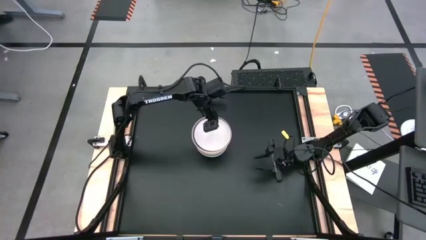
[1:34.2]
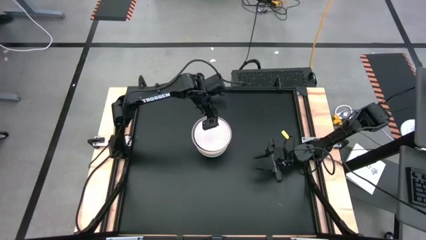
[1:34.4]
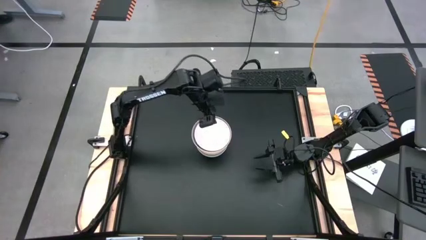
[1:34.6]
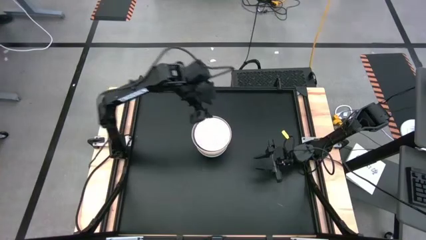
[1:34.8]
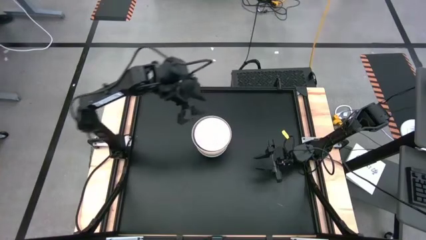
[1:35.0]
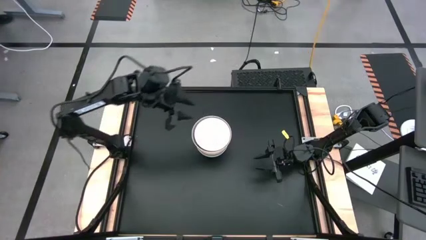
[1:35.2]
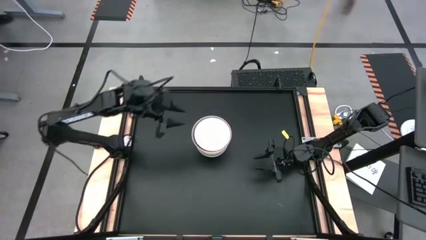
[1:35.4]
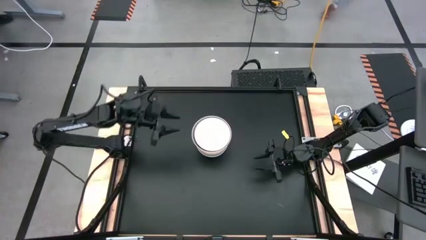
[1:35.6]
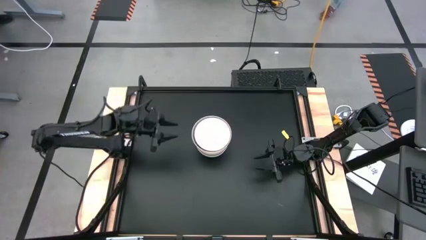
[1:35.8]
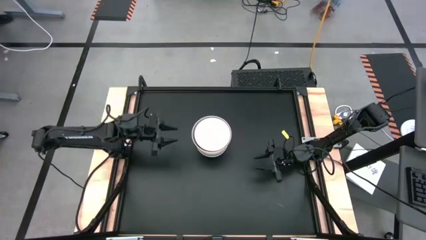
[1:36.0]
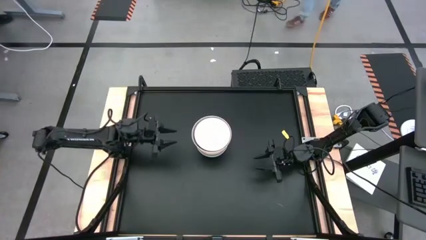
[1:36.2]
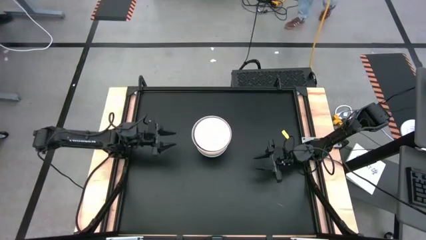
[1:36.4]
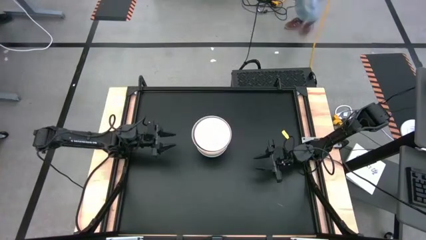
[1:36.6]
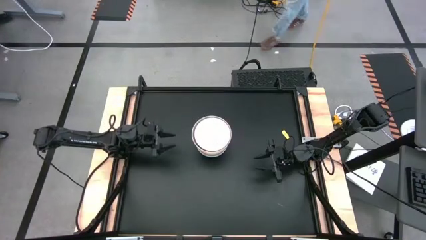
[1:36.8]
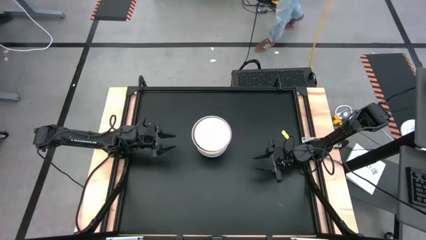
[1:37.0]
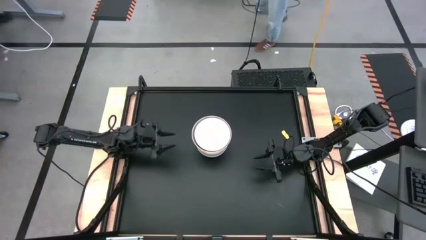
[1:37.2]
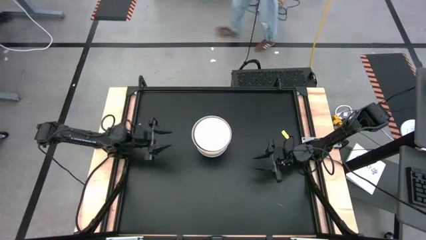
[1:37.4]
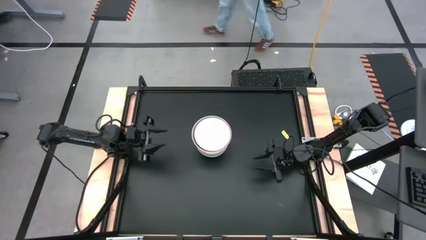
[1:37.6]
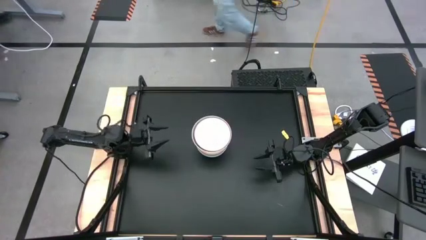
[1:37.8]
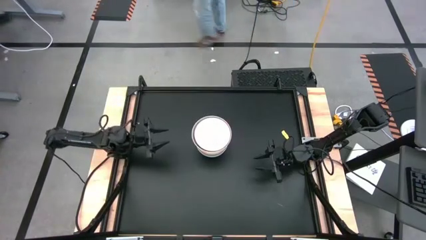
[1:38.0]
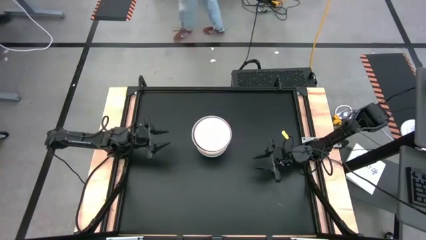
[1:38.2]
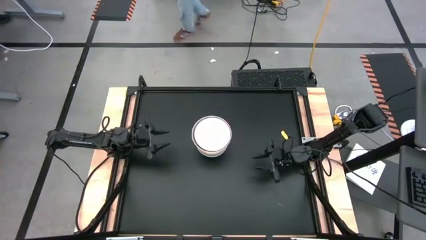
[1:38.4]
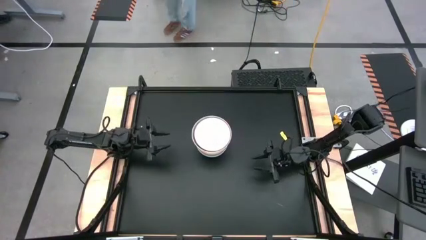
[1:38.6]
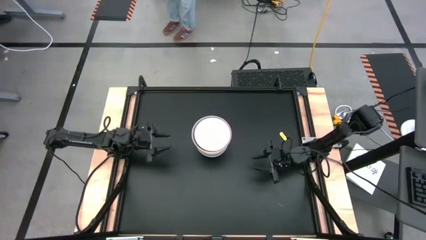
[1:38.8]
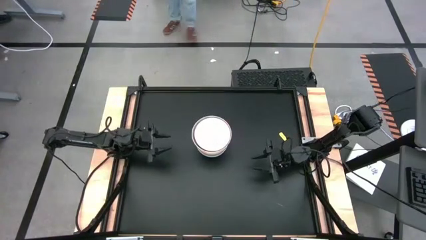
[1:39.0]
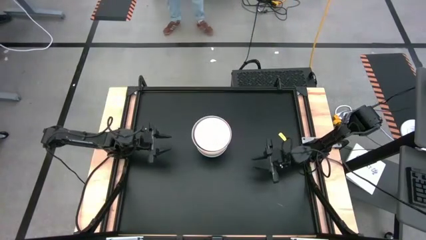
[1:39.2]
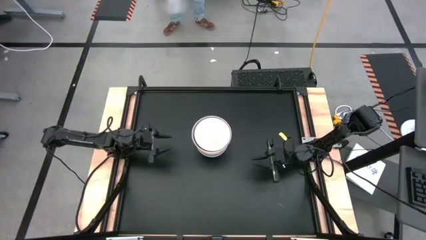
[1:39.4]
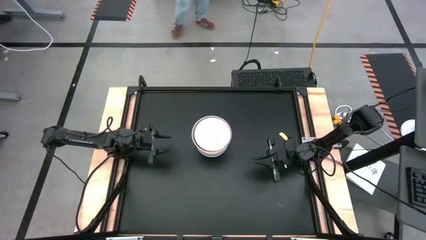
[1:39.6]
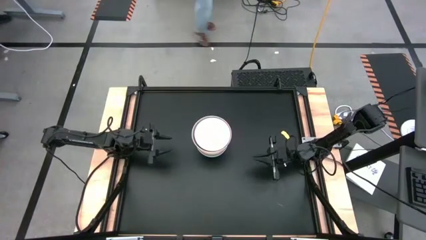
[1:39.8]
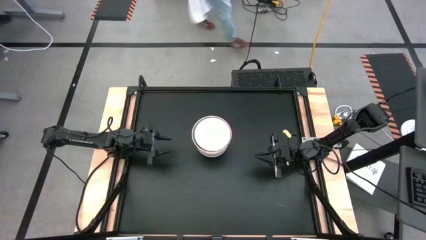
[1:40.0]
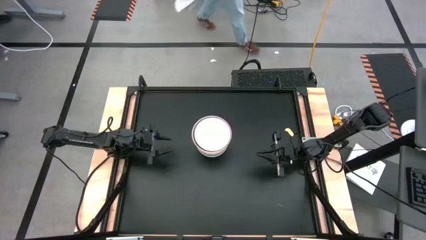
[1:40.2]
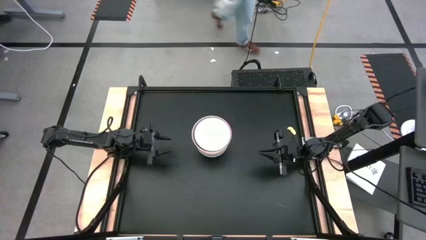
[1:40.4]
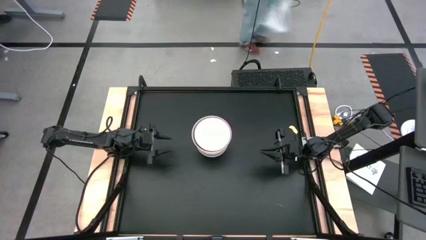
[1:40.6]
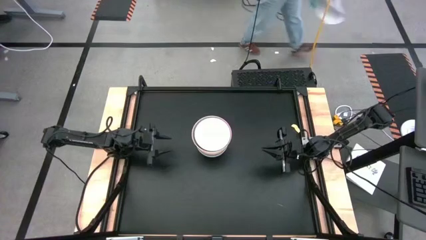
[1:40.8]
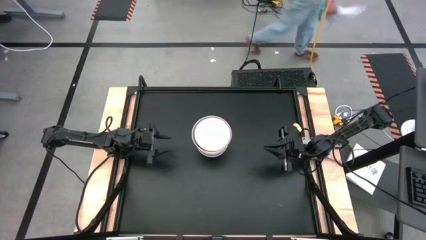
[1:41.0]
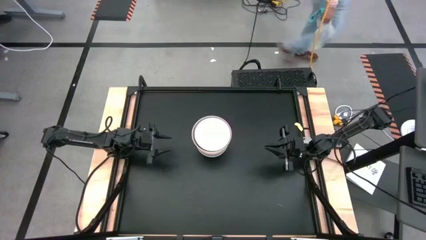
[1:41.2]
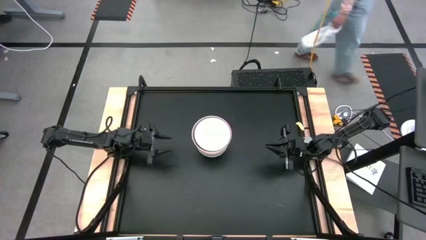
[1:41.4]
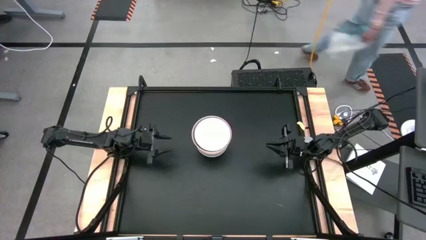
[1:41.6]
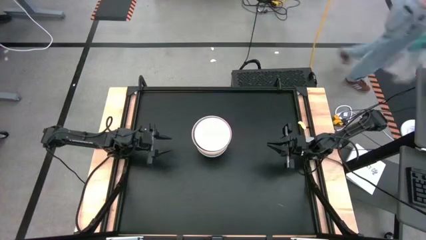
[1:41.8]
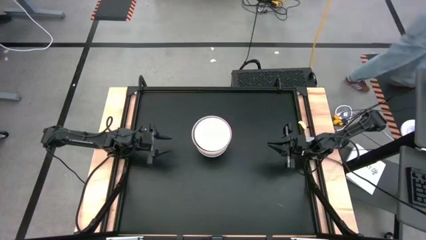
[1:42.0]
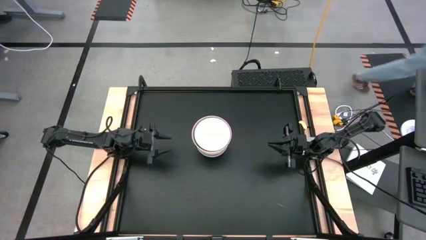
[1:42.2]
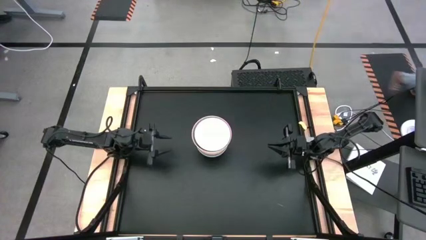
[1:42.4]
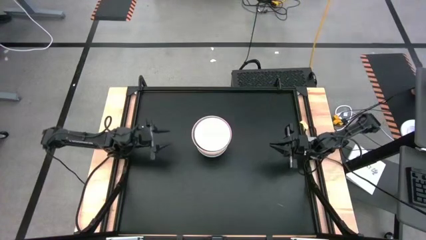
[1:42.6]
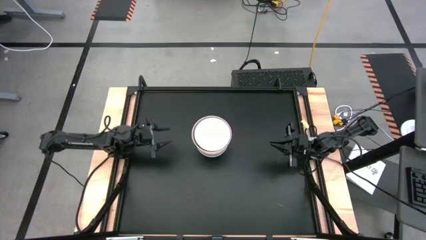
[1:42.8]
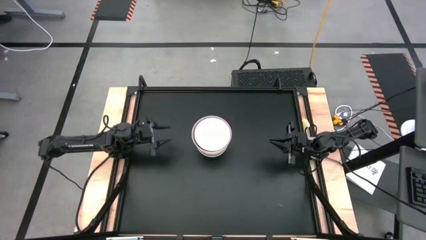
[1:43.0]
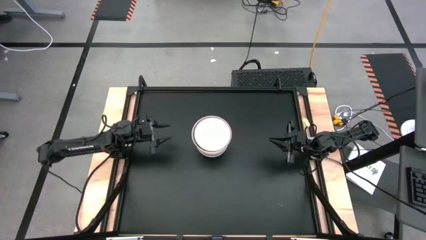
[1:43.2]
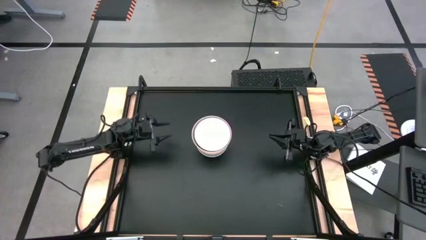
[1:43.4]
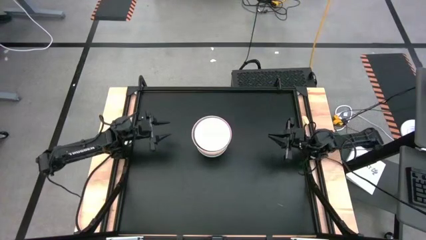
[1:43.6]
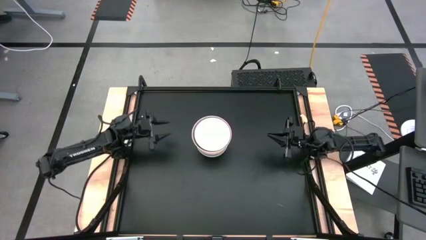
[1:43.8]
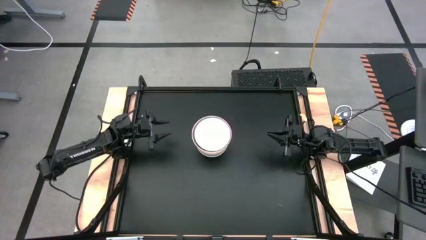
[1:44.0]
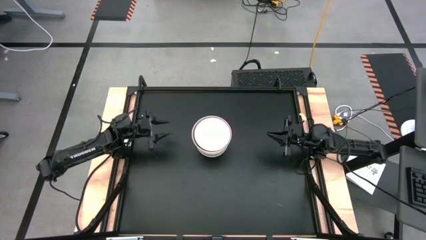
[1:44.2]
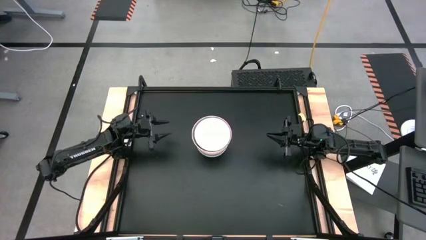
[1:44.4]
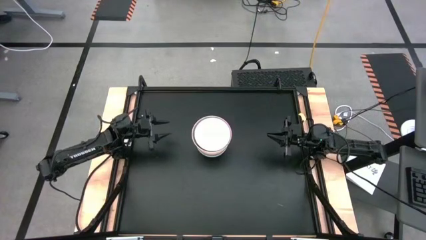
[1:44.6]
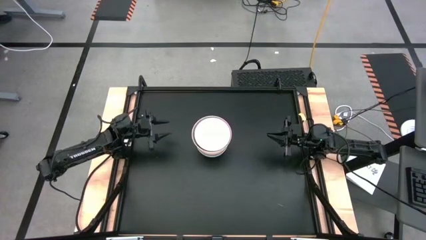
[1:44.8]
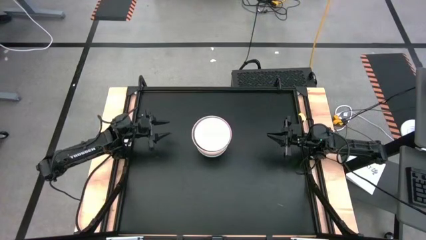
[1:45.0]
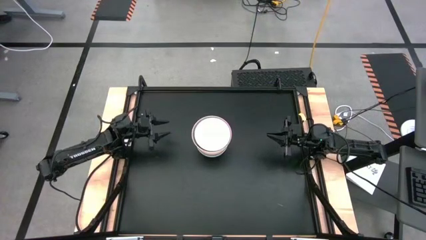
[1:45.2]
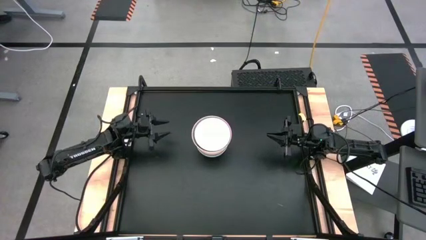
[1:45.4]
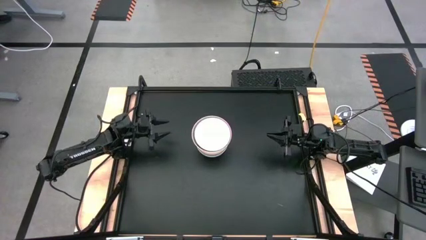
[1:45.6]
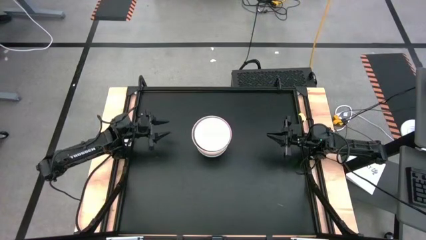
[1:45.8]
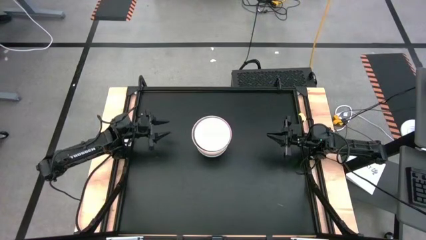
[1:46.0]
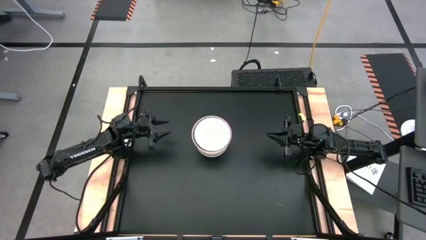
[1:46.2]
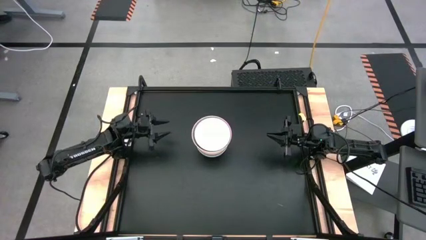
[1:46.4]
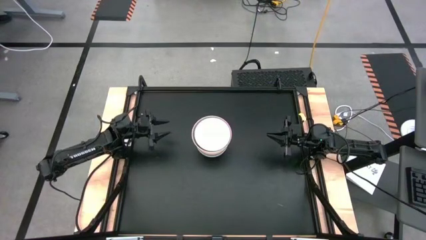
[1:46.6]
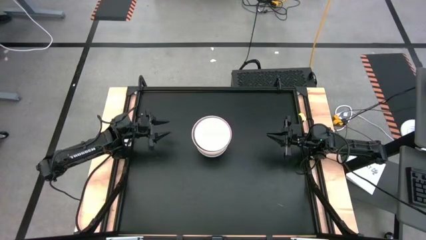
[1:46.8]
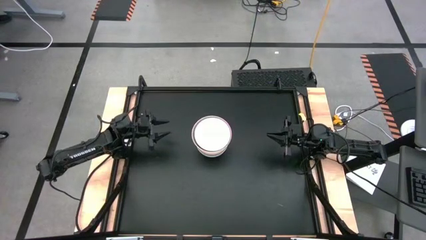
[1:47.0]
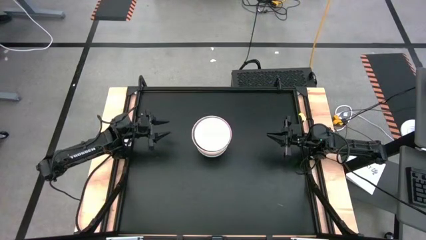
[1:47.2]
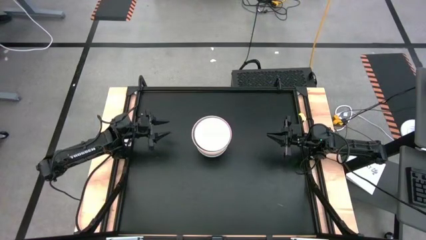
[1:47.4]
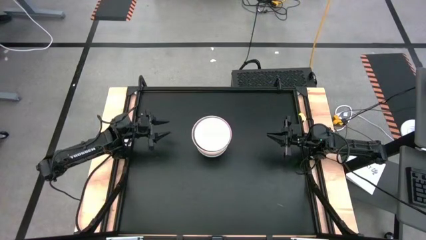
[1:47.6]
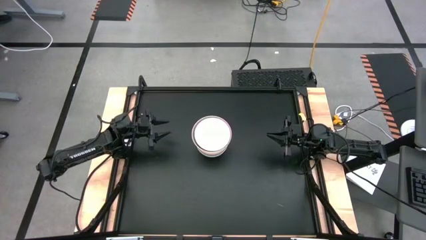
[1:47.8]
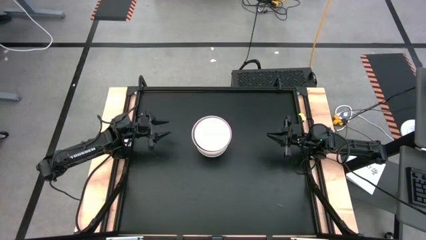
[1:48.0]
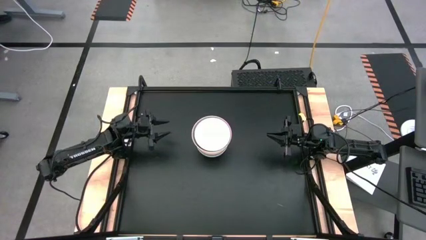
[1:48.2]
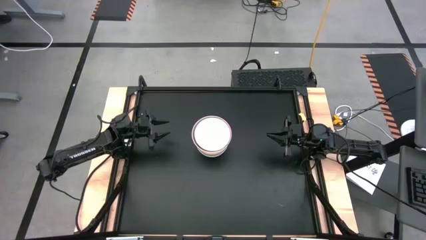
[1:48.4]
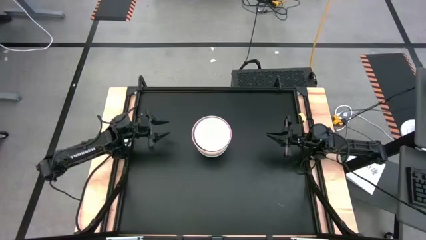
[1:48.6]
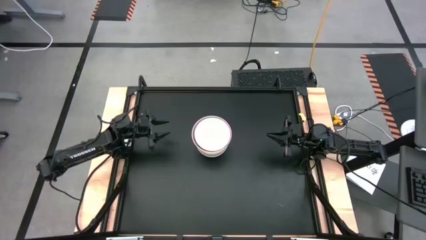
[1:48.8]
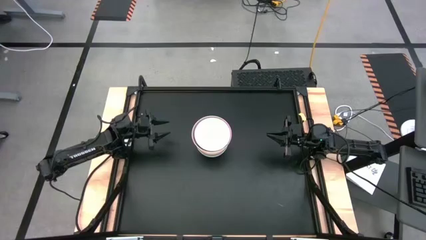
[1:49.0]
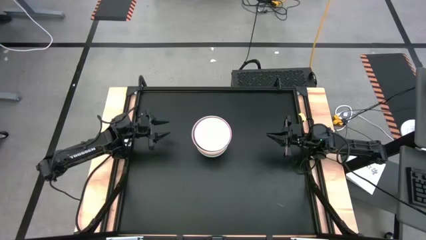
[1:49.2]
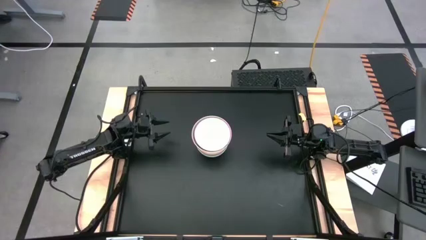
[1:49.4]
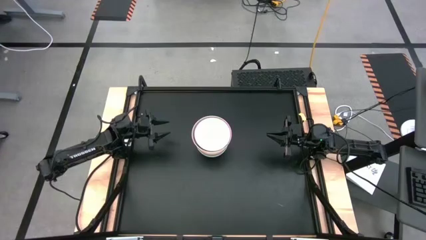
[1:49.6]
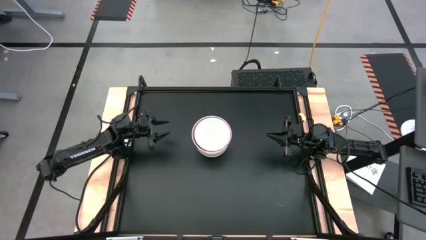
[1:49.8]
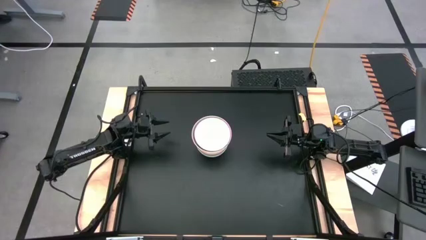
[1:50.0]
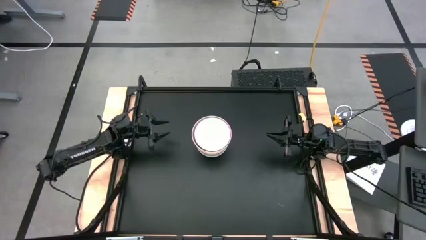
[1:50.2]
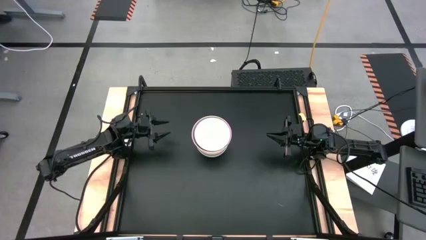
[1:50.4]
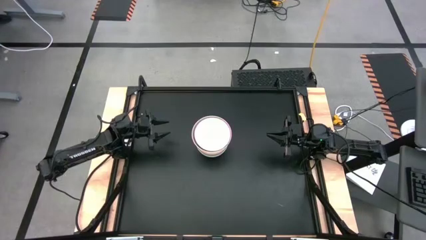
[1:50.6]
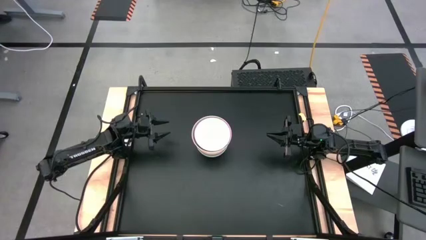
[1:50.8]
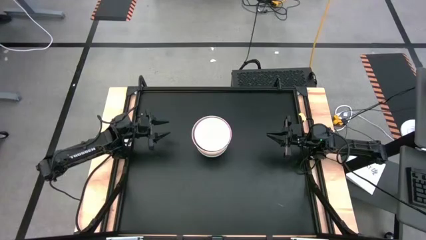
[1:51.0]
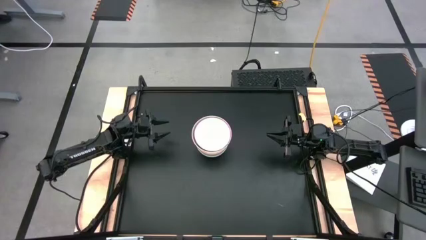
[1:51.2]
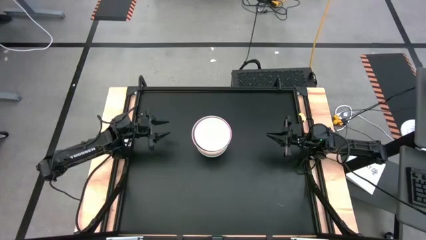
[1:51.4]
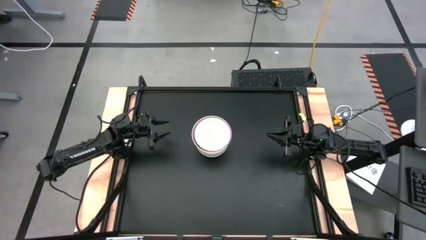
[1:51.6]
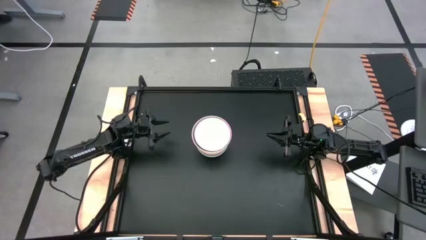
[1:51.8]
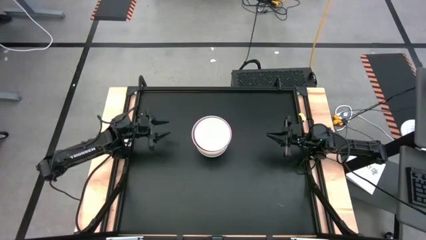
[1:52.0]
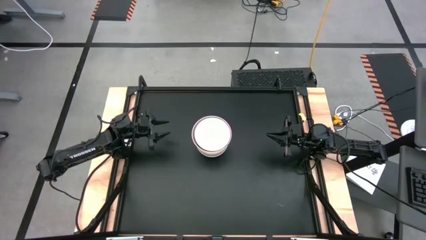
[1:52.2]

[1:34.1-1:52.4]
Task: Nest bowls inside each other
Return to Home Position
